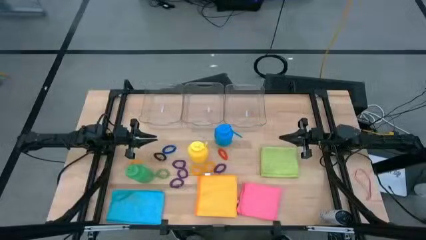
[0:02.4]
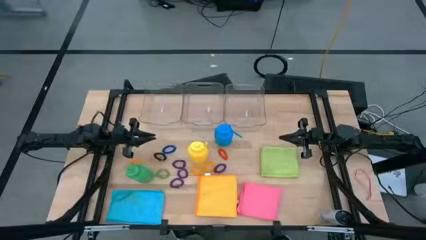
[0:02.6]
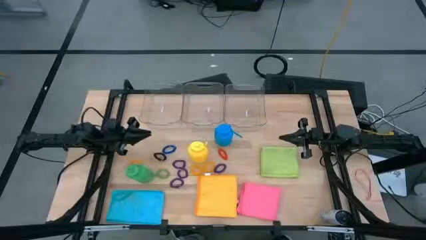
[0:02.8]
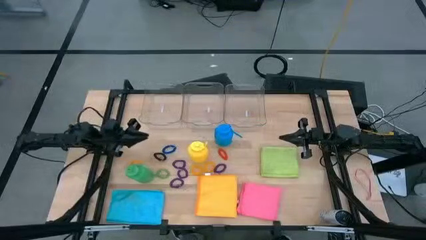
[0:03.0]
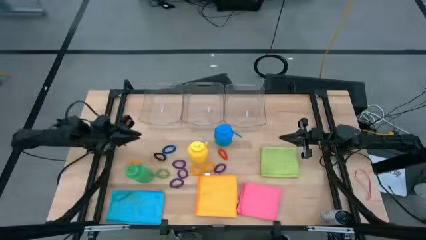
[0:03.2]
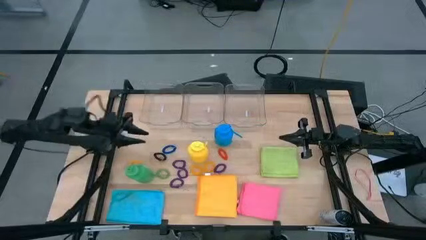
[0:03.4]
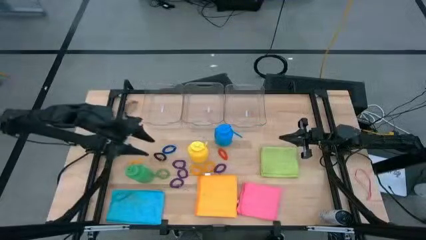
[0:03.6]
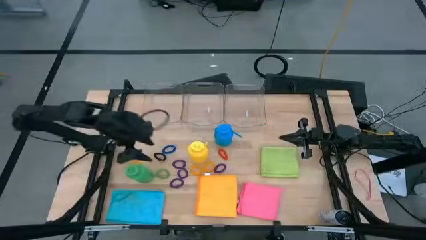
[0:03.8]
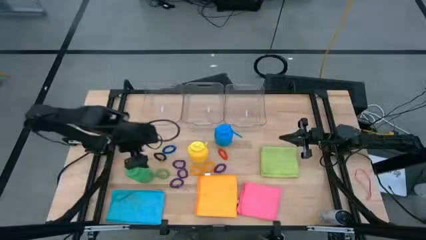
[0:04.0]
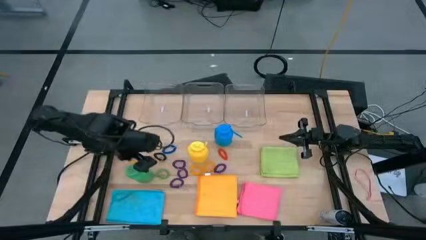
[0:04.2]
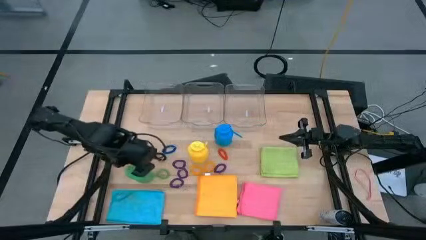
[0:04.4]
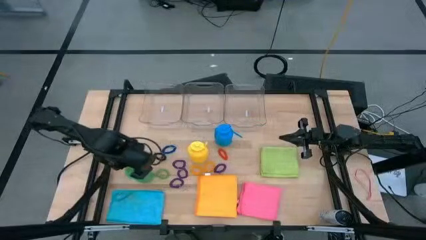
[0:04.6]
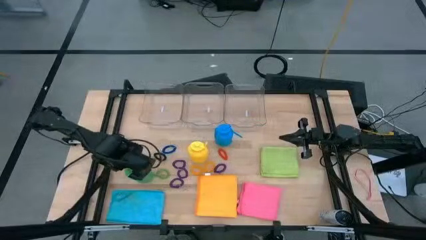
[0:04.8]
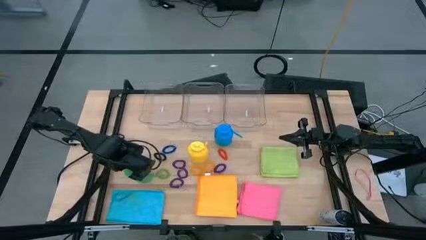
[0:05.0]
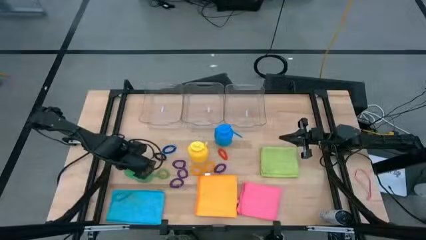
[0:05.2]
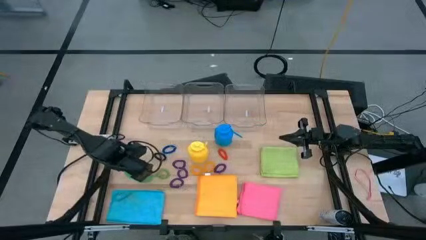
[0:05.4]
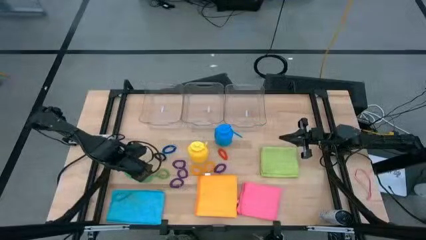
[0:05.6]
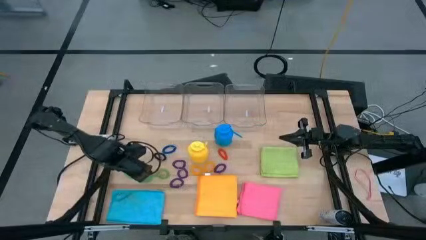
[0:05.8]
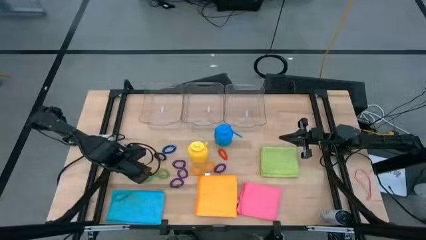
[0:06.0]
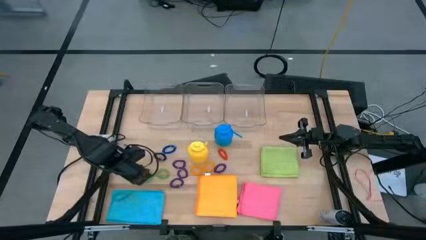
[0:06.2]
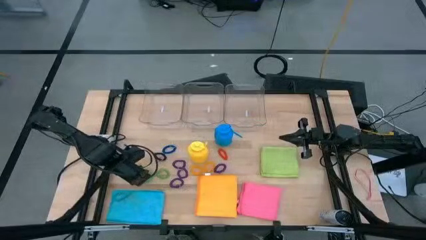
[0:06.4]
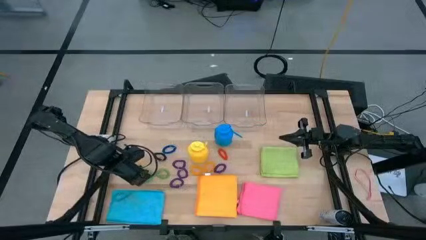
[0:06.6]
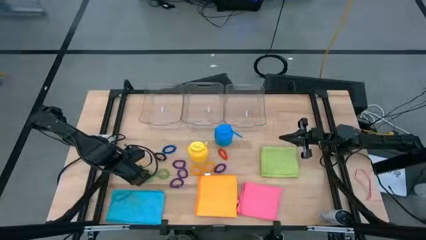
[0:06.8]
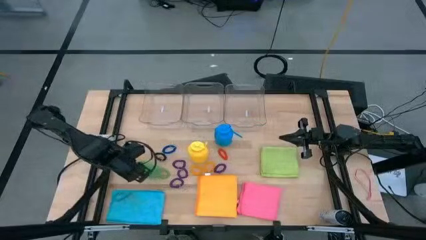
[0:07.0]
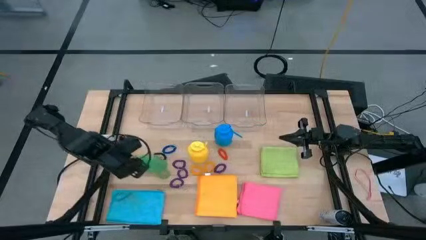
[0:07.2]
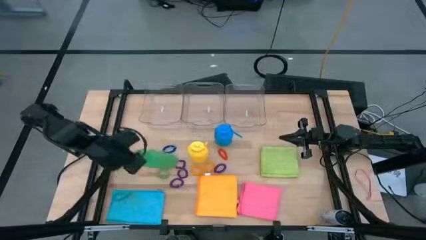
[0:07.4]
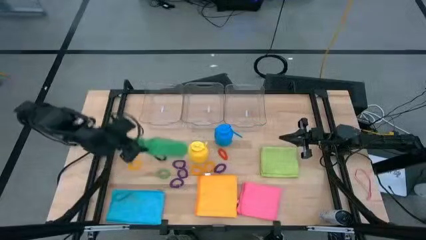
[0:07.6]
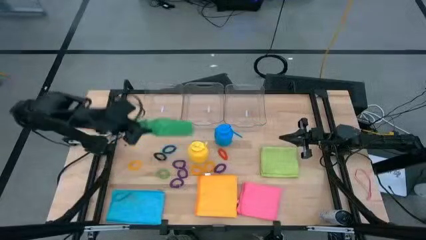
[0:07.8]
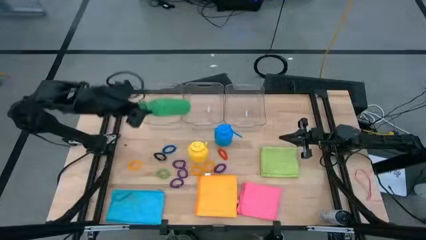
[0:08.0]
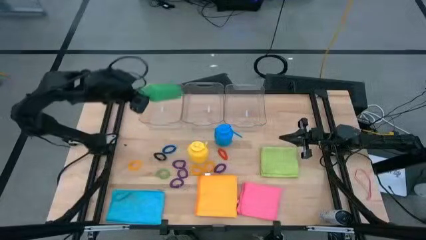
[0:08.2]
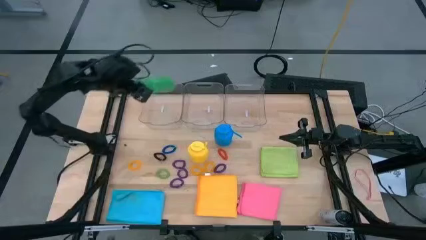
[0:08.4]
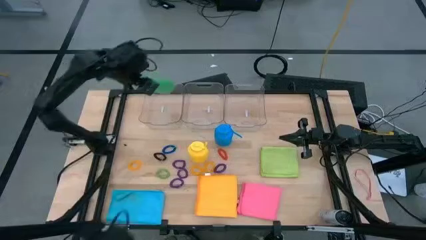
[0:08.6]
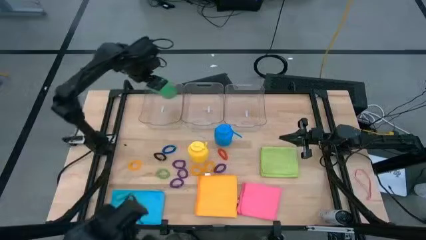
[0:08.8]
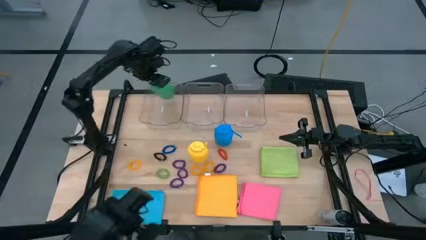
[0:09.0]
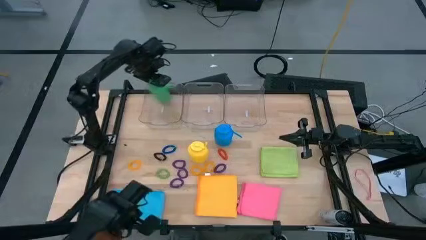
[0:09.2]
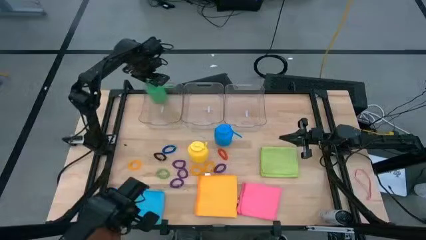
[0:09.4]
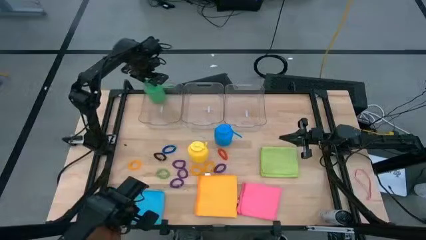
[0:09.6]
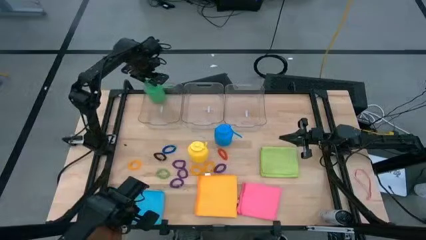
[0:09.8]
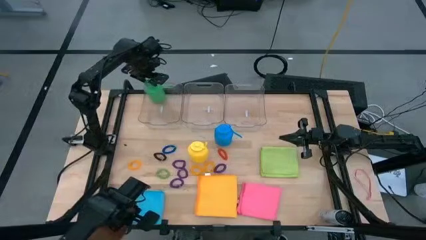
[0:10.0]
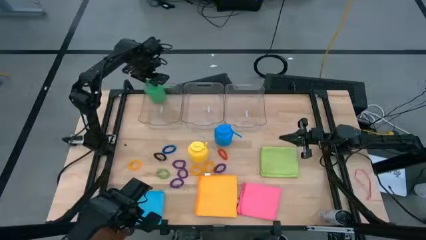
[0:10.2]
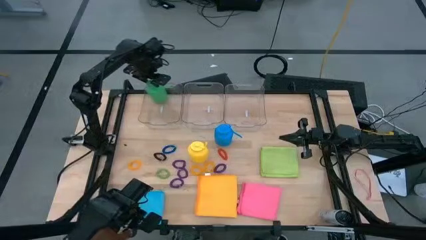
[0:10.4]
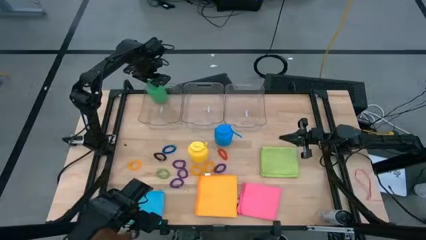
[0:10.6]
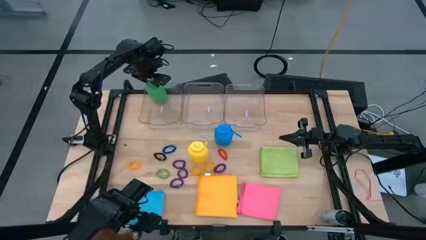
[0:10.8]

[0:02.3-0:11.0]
Task: Pick & Place Sports Items
Put the green tumbler into the left transparent container

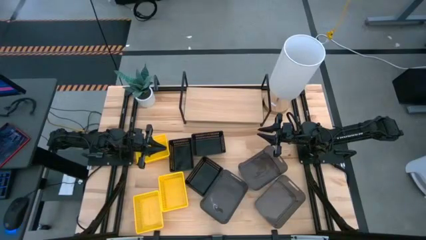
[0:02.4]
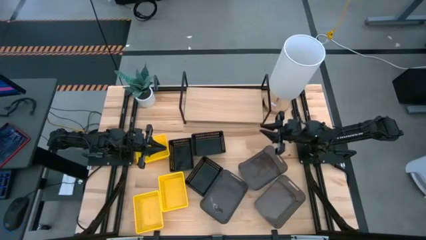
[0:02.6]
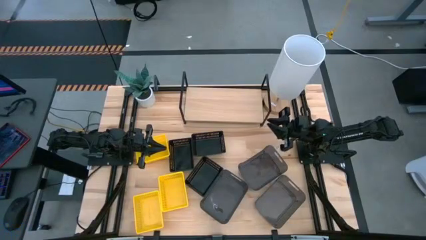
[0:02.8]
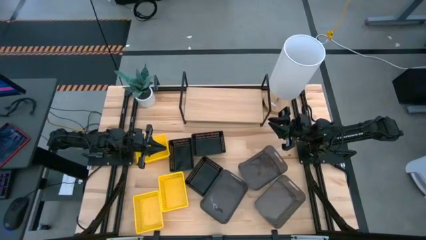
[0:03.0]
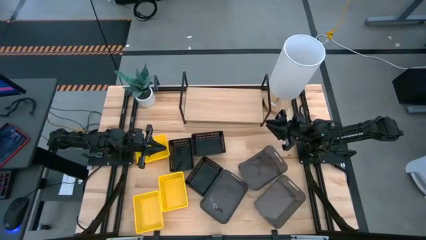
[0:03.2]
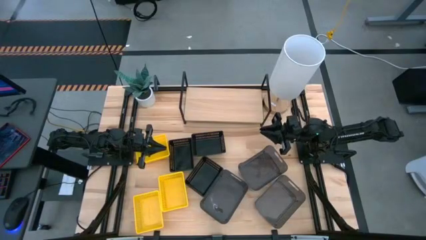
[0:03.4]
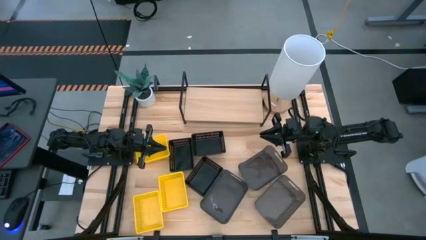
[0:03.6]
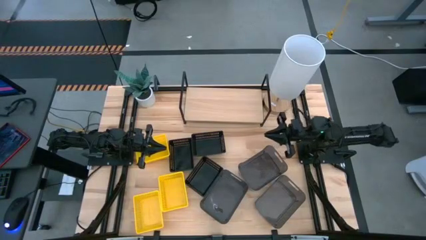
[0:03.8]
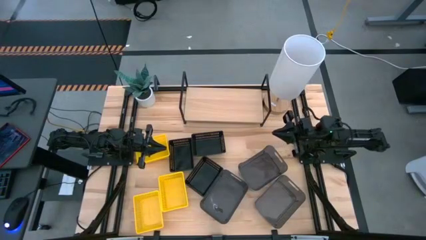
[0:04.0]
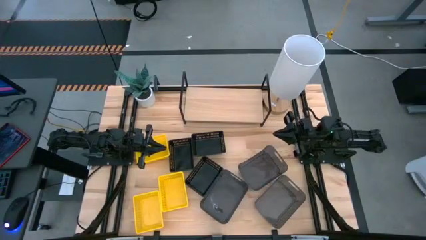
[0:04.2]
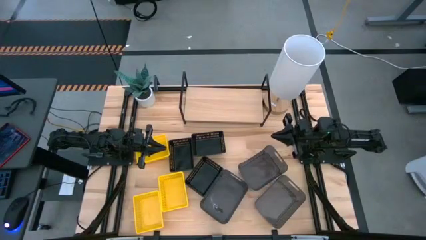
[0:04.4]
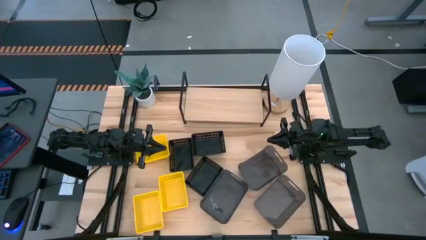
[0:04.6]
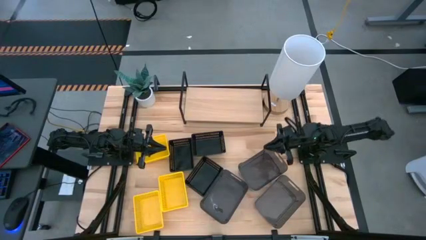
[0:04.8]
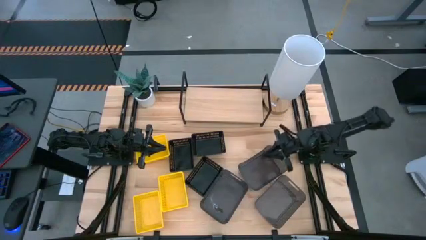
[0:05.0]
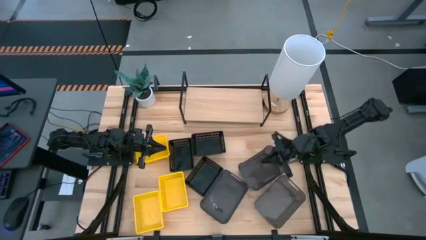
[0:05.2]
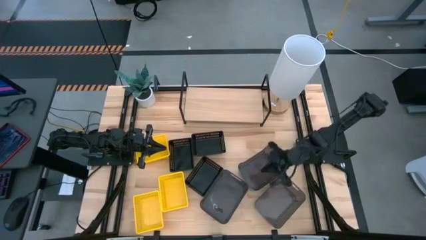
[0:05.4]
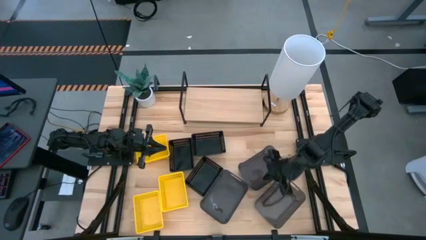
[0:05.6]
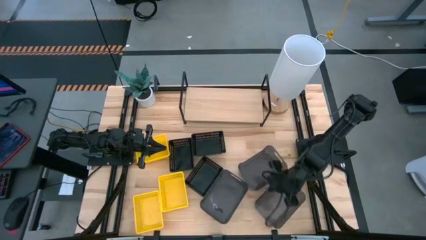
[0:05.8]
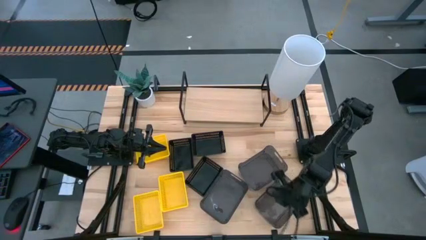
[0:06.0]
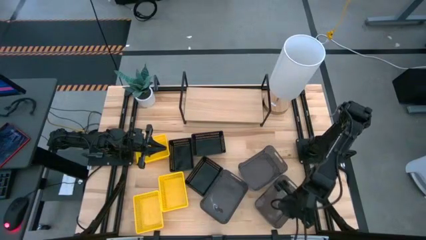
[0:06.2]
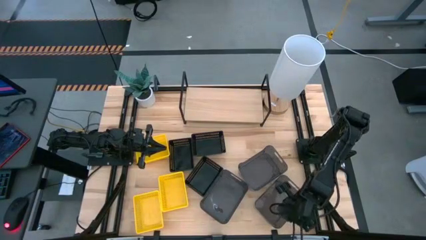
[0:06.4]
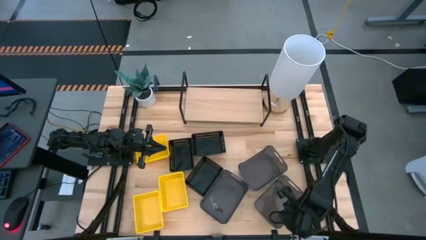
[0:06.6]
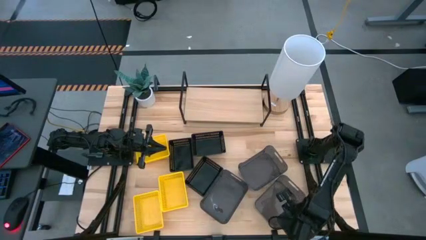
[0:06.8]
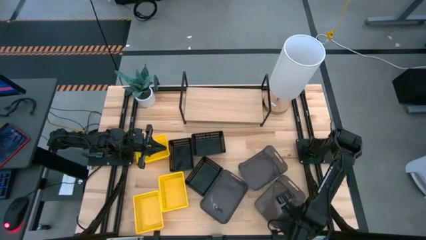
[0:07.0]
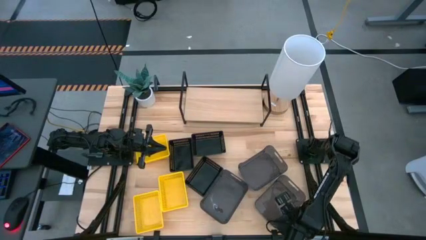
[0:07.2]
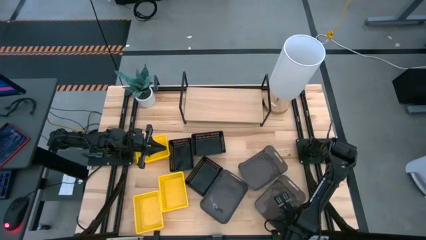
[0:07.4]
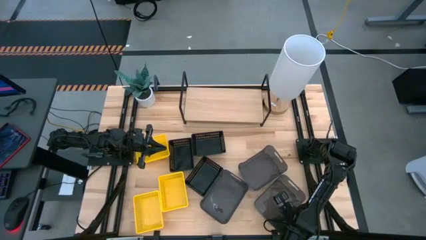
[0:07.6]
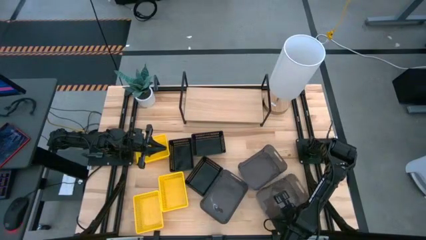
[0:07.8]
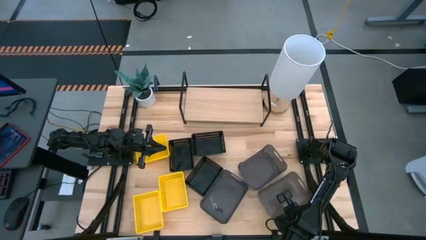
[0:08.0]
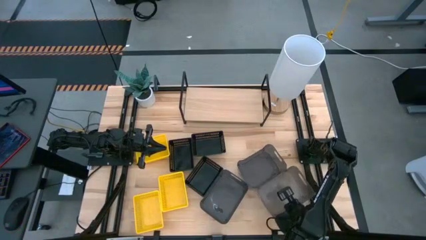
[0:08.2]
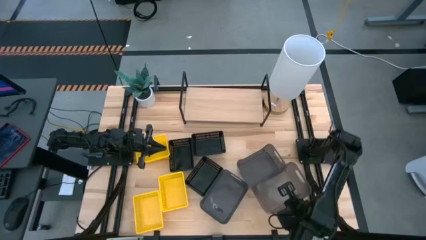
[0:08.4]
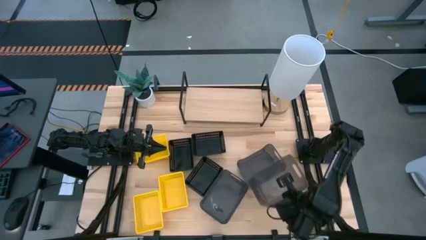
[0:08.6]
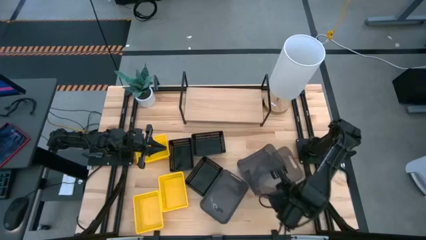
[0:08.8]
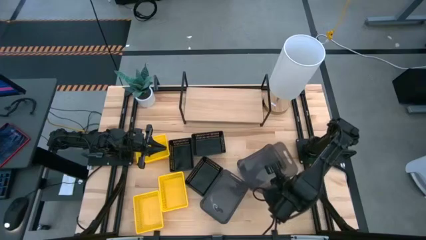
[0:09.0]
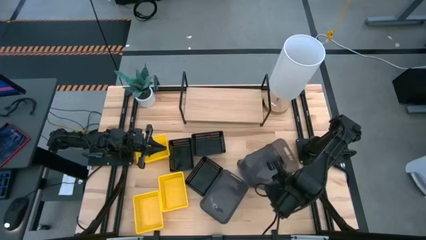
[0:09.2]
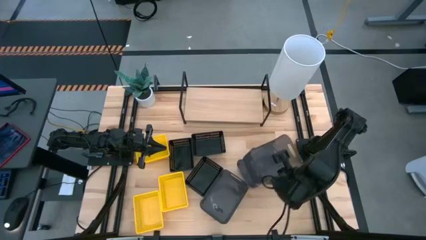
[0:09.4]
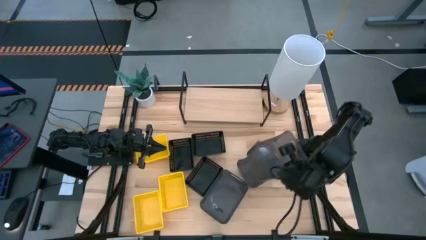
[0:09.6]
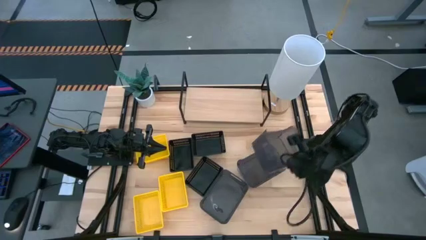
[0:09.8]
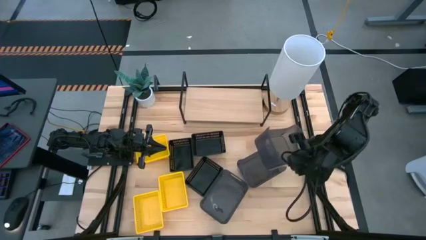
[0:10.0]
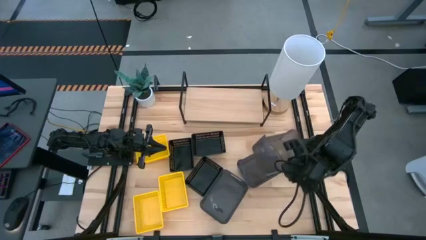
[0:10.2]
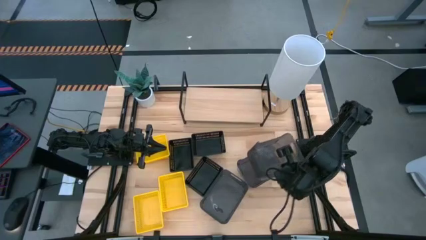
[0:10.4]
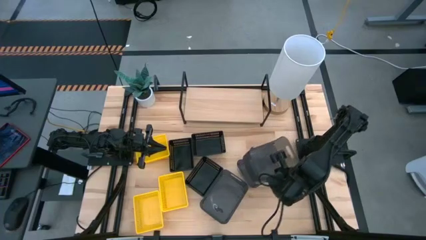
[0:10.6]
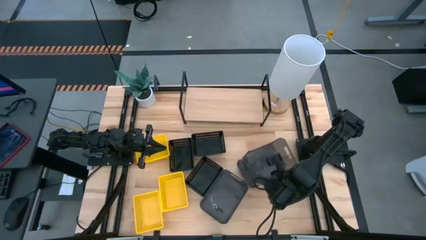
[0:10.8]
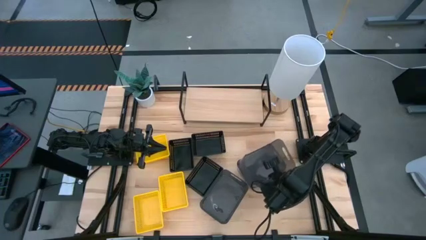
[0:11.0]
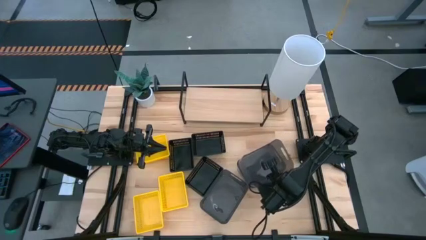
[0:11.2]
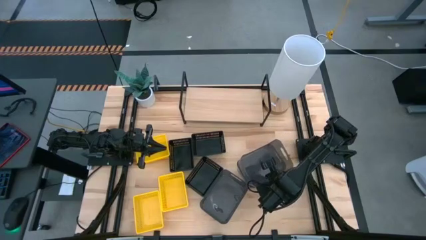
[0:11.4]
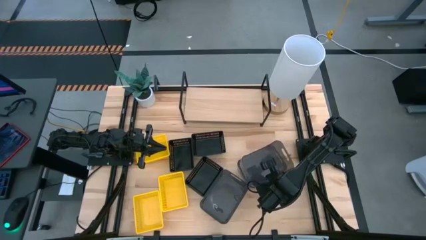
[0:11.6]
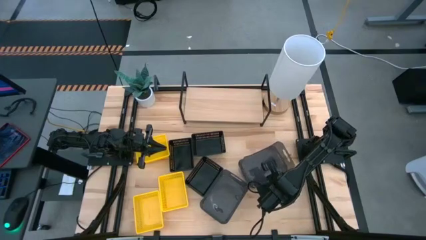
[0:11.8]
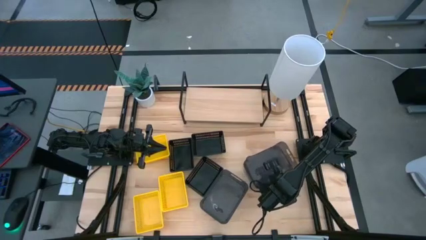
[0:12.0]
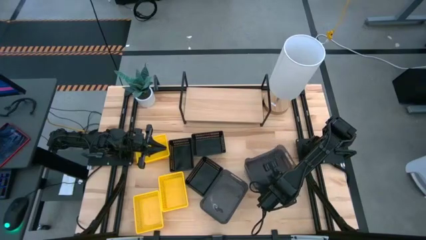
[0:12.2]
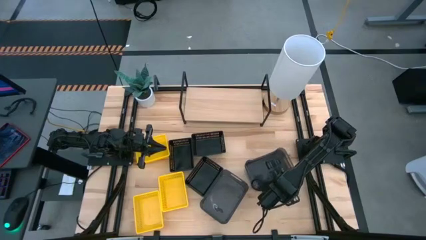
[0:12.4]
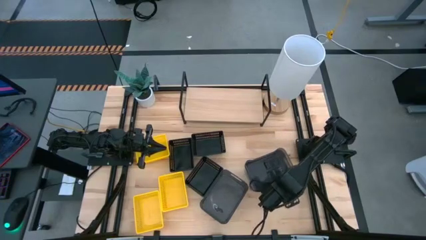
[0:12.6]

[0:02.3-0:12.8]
Task: Stack baskets on shelf by color
Stack the bottom right gray bin on the top gray bin
